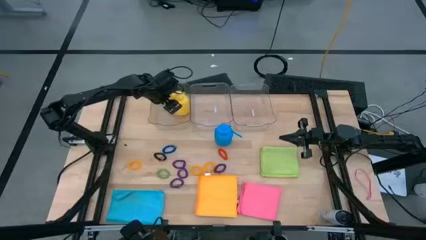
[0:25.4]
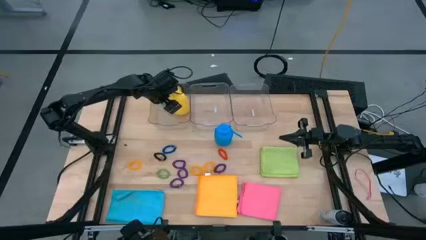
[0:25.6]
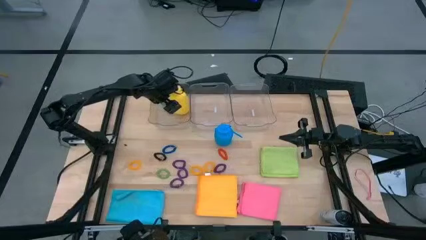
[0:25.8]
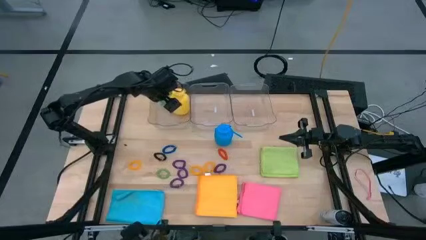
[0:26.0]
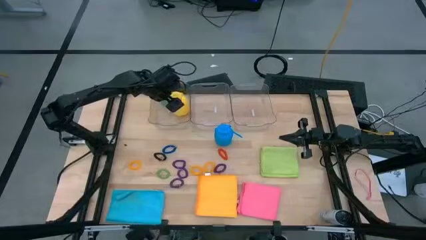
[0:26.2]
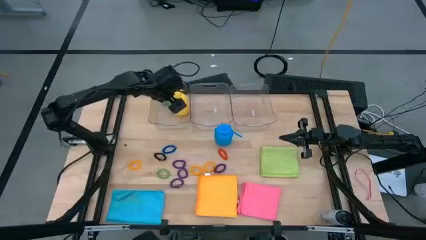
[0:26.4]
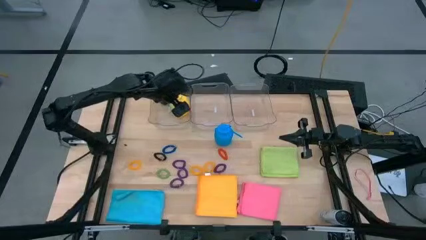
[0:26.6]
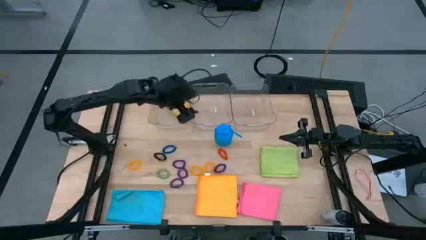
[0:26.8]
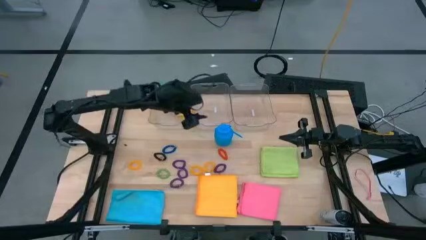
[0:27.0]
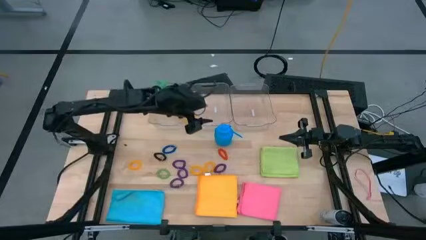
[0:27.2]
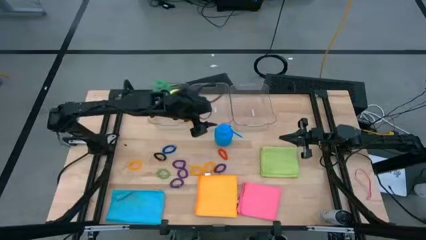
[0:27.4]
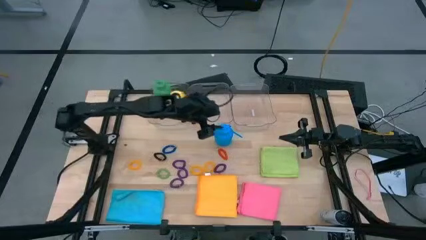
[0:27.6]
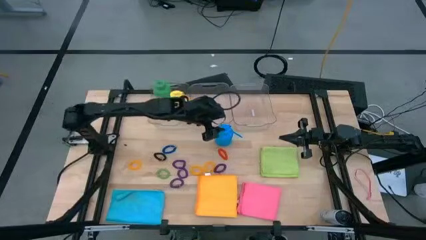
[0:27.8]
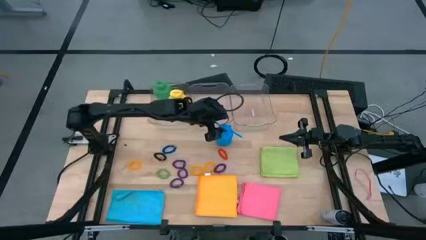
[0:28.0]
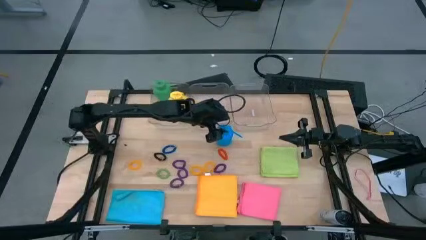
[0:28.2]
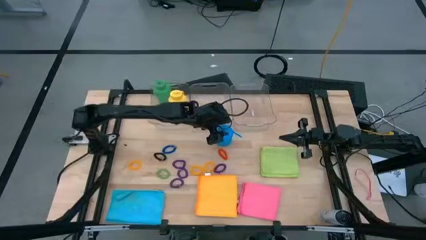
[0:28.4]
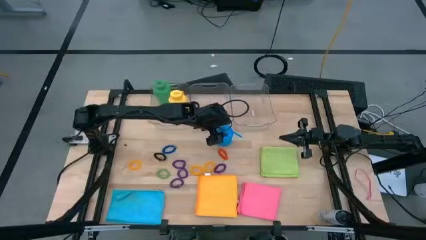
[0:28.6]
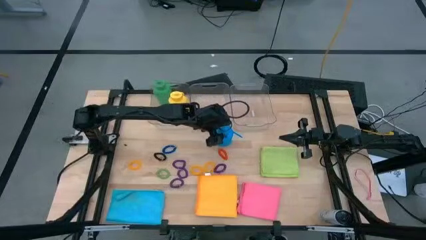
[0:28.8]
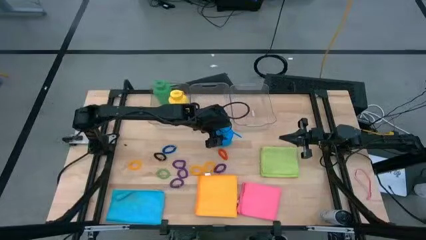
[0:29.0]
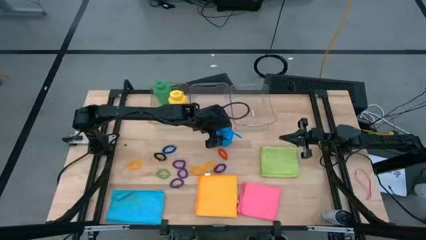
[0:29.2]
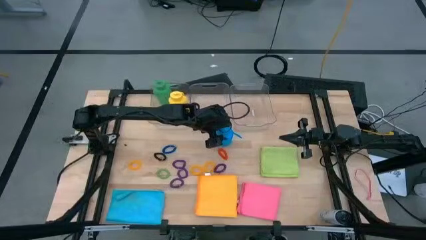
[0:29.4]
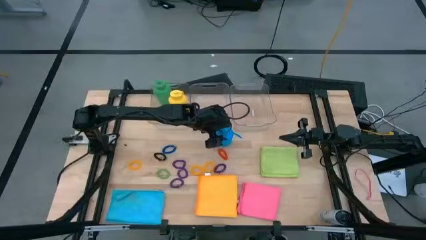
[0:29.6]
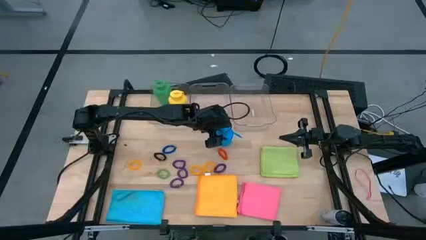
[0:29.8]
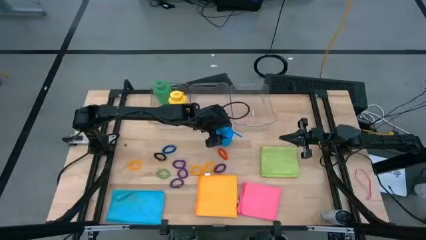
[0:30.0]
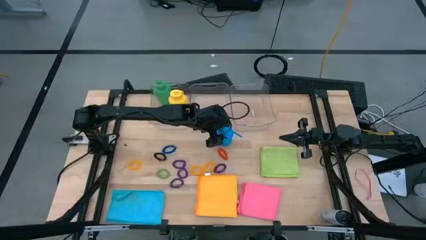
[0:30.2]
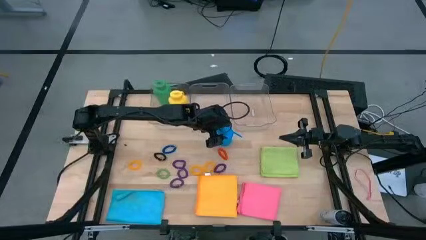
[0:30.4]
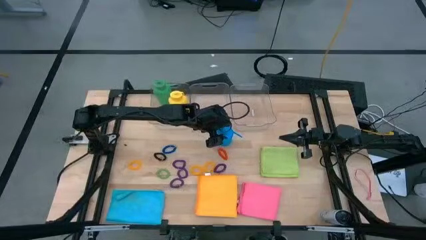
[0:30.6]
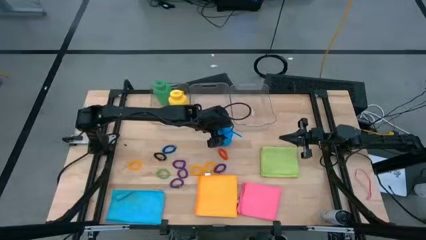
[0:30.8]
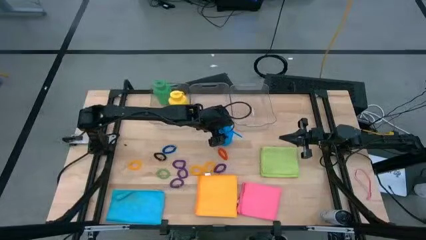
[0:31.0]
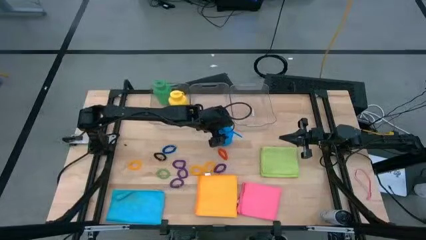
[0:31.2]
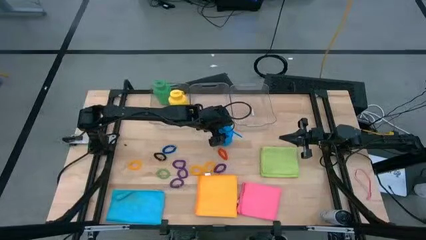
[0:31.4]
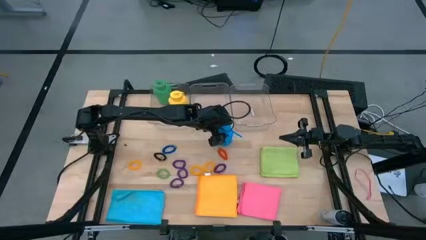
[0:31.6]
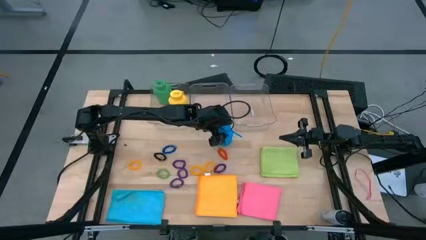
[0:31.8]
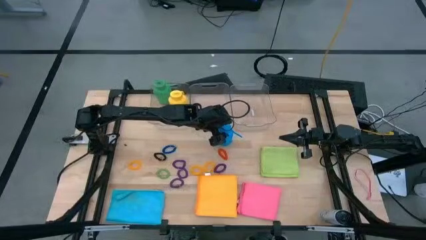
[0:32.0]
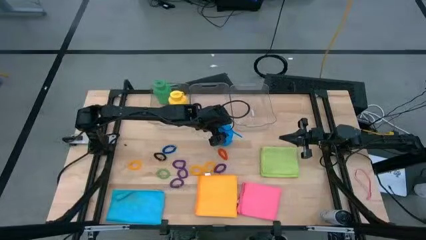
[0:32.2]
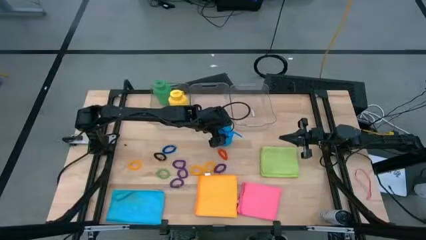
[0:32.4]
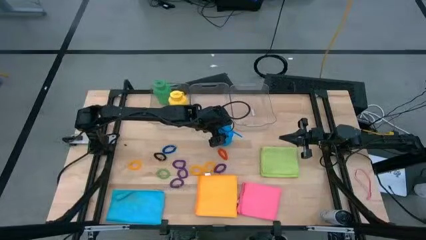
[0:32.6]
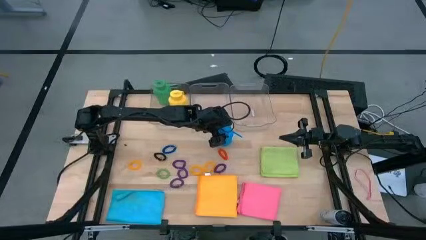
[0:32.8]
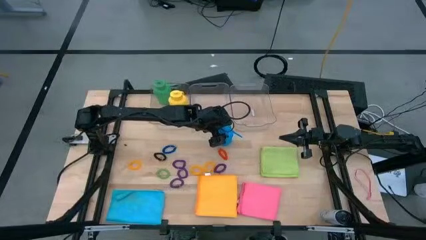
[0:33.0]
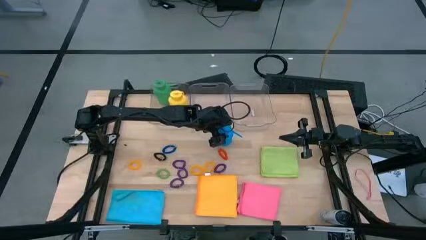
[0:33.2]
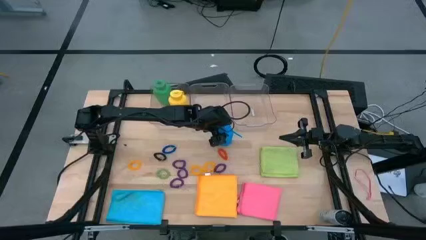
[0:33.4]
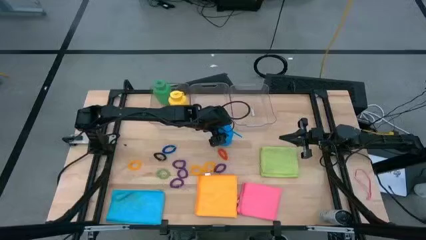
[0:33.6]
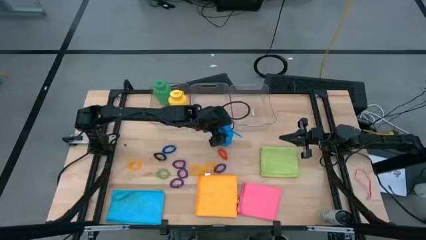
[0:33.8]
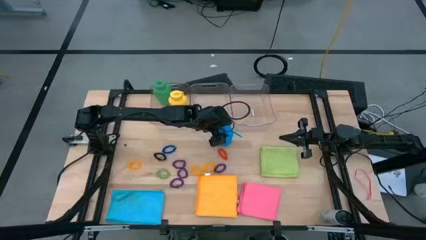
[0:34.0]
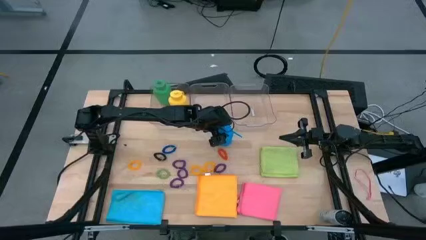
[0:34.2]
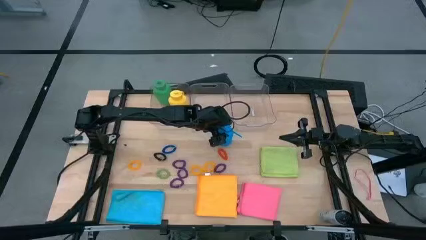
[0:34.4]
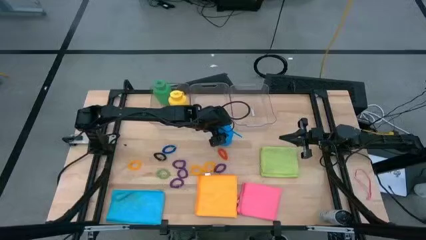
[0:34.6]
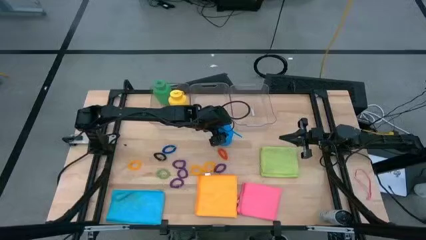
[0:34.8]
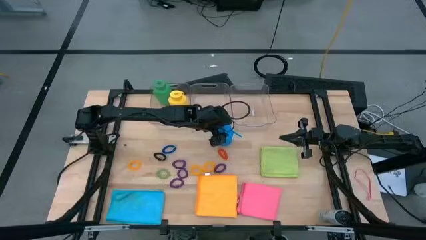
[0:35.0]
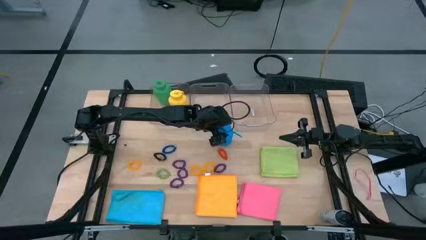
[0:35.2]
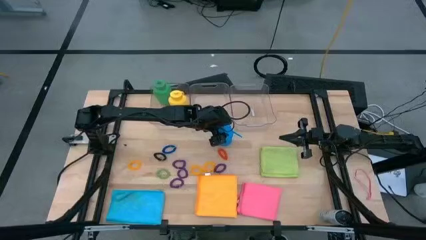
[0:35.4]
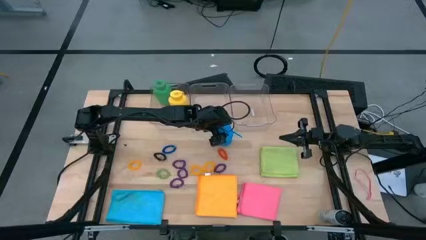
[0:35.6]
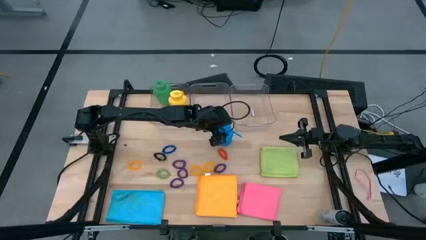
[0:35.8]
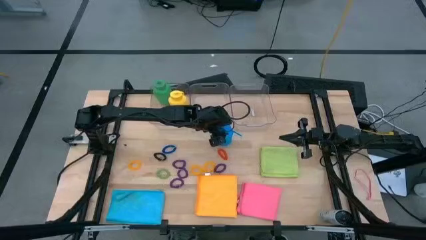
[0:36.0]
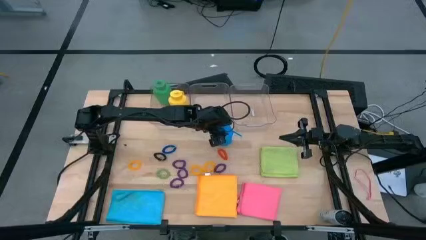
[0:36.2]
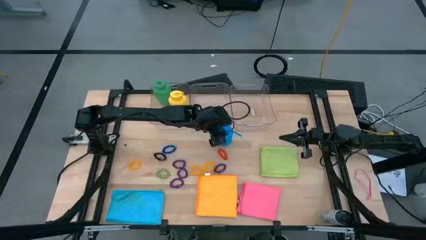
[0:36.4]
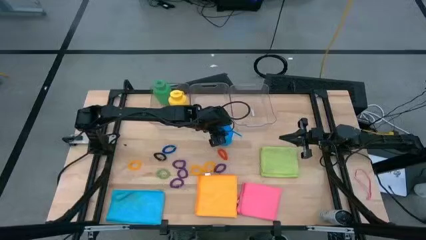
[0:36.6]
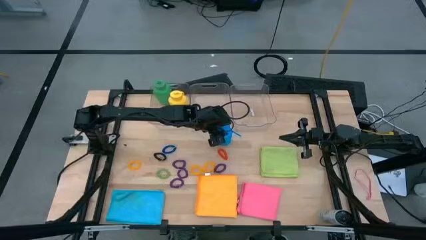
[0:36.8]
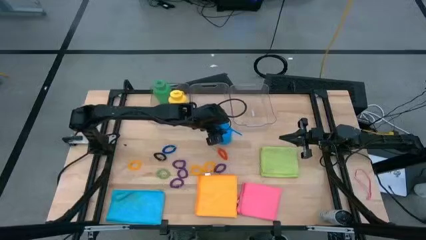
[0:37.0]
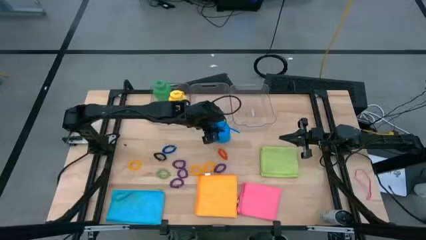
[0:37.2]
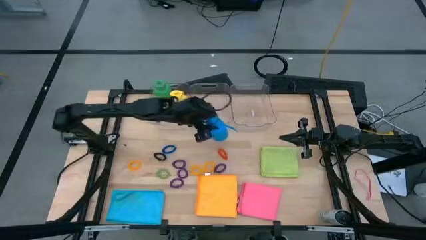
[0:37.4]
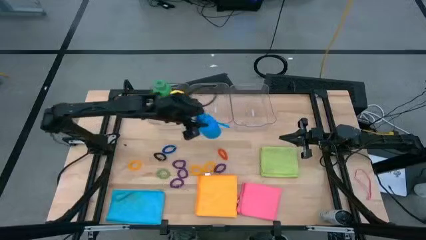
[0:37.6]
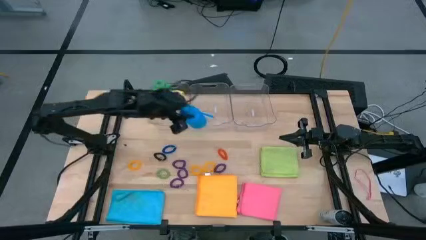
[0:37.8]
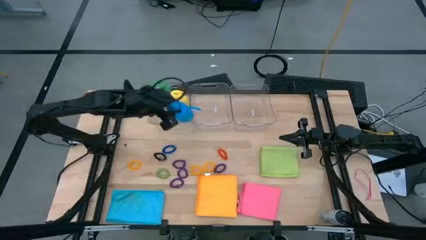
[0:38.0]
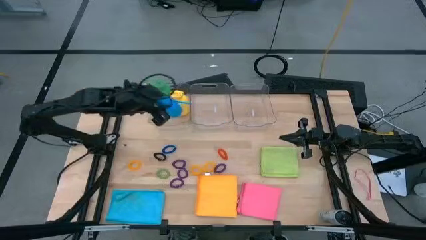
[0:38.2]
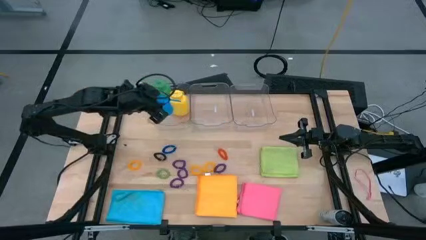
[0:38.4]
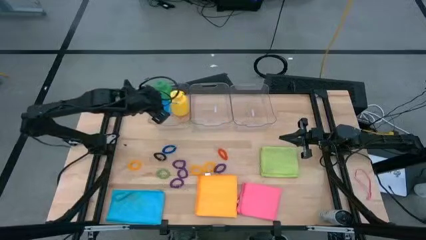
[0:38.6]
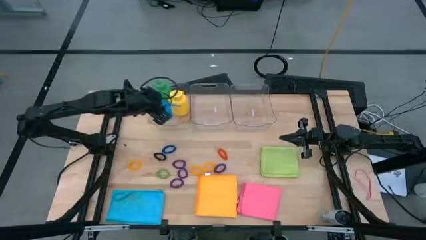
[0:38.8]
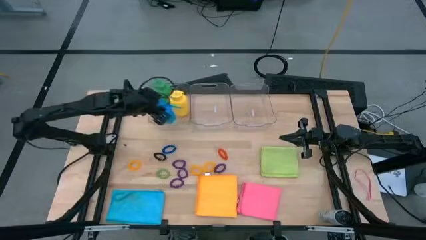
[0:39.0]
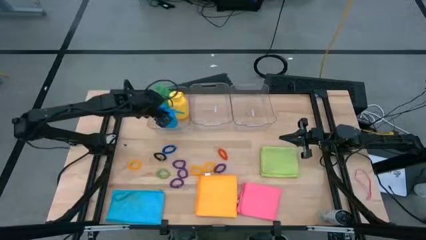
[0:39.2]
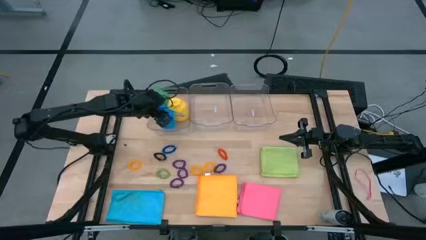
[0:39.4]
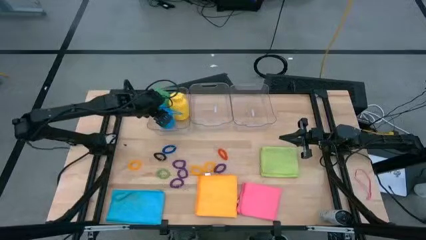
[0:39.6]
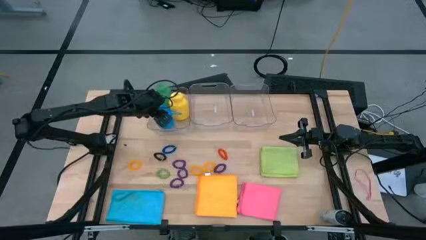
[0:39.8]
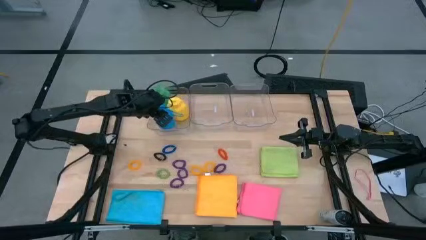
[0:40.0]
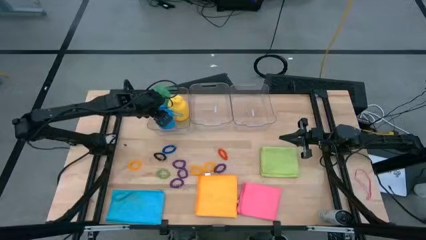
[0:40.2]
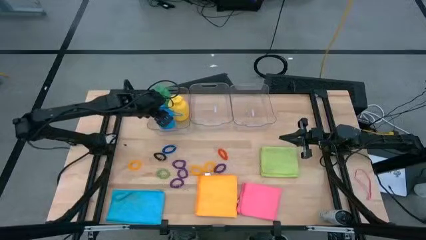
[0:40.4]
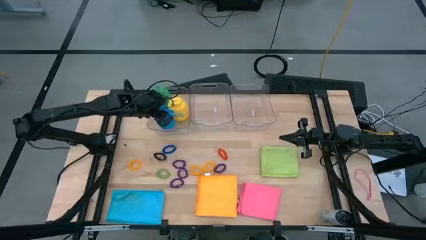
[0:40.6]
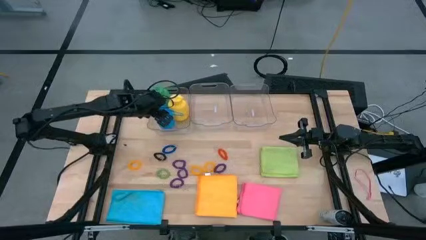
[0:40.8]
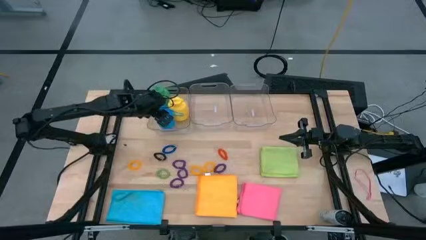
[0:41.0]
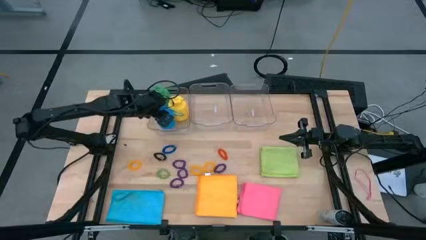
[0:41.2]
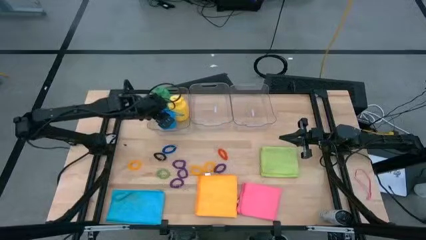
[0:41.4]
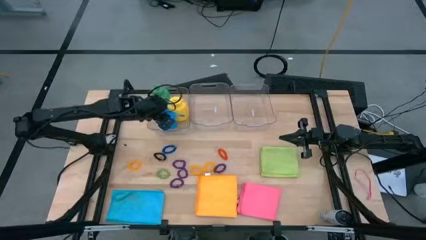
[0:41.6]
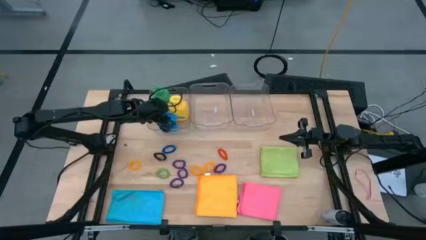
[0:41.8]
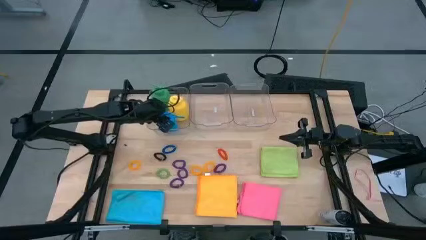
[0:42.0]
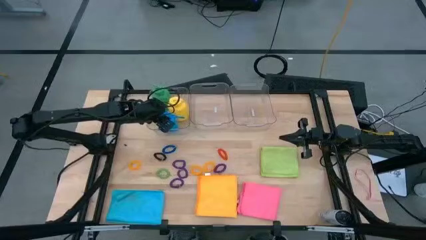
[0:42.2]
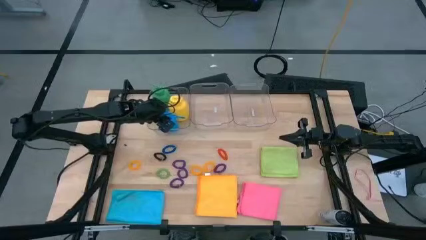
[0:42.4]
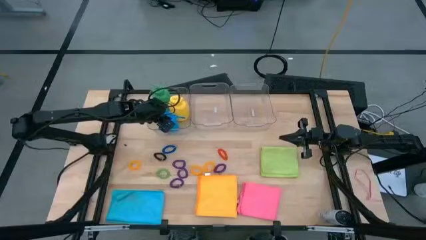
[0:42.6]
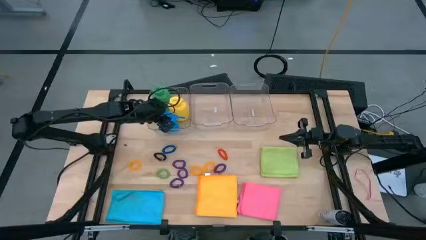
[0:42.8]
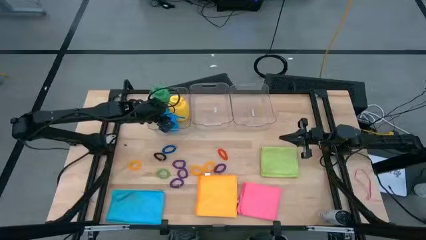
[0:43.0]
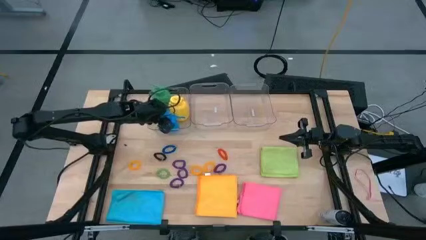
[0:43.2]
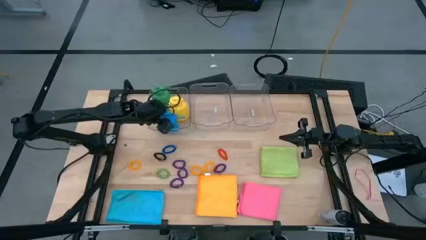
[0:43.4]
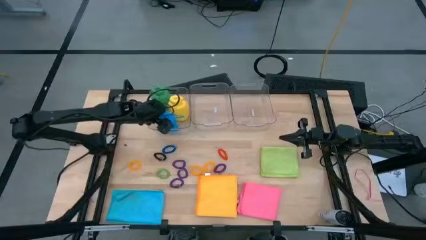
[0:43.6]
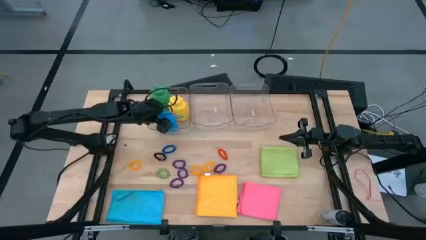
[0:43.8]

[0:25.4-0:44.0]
Task: Pick & Place Sports Items
Put the blue tumbler into the left transparent container
